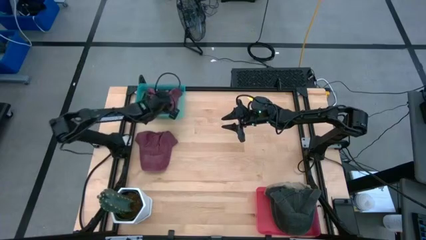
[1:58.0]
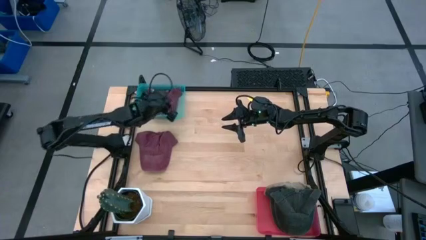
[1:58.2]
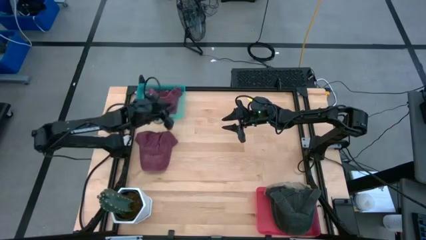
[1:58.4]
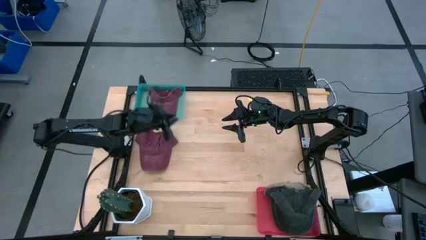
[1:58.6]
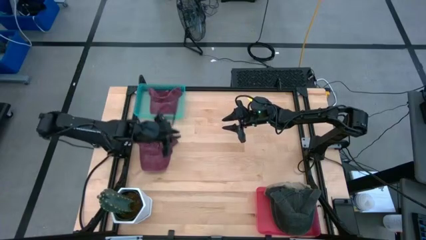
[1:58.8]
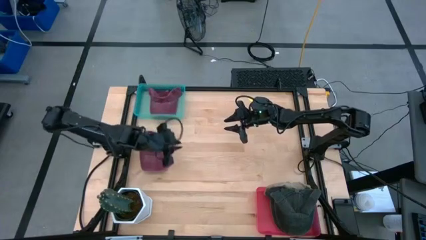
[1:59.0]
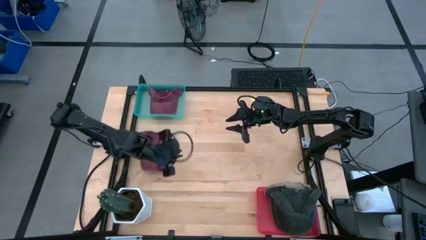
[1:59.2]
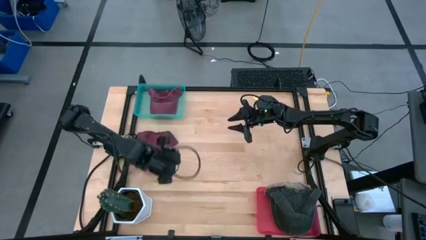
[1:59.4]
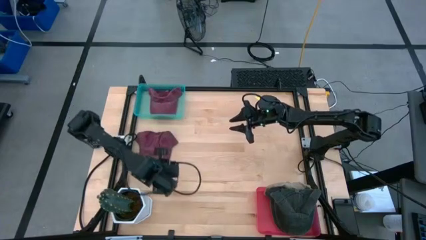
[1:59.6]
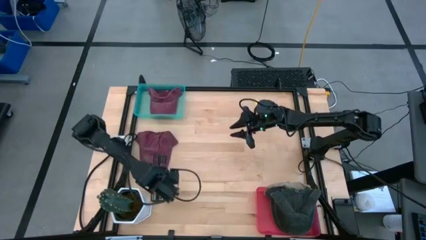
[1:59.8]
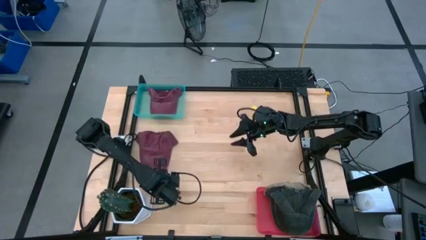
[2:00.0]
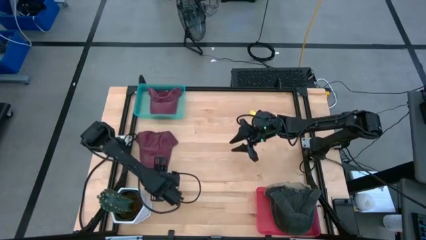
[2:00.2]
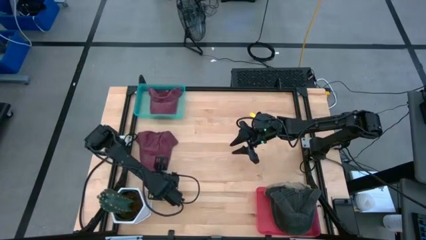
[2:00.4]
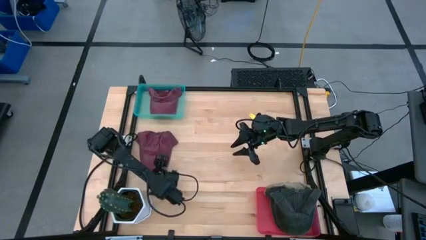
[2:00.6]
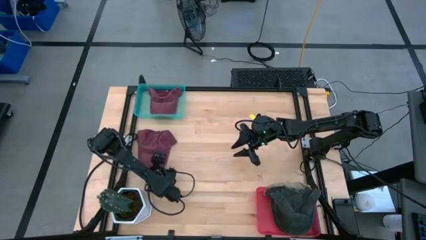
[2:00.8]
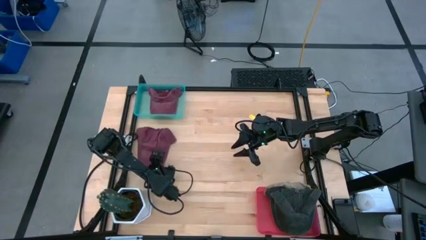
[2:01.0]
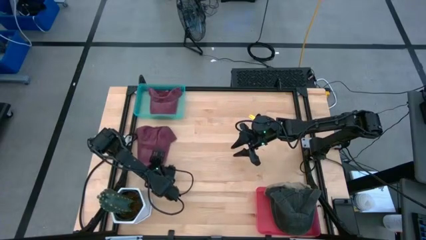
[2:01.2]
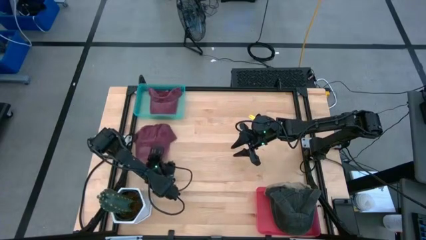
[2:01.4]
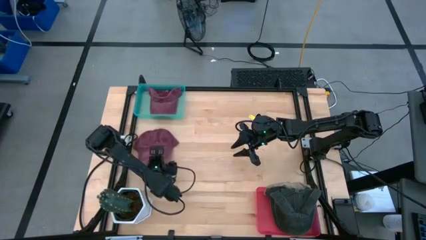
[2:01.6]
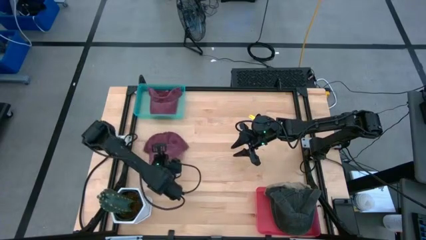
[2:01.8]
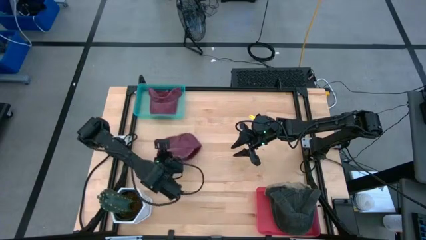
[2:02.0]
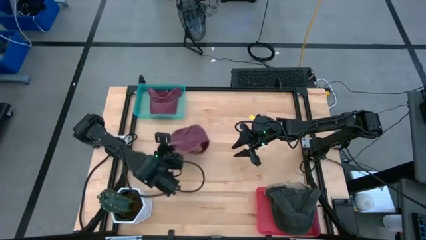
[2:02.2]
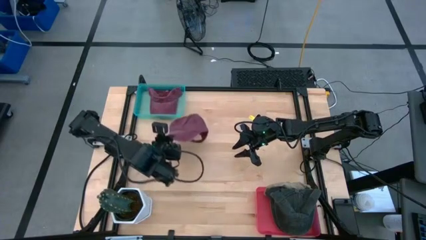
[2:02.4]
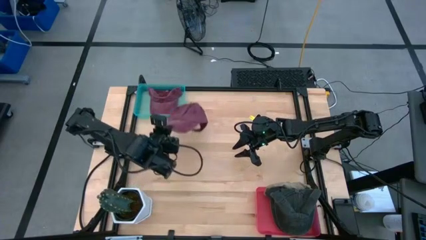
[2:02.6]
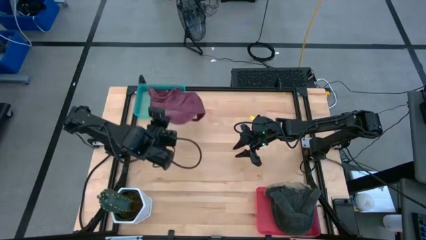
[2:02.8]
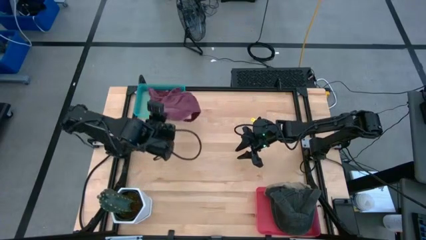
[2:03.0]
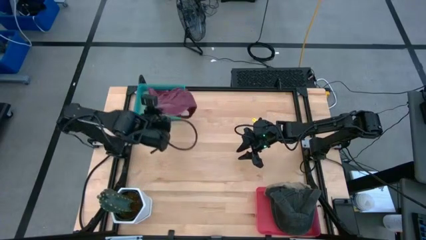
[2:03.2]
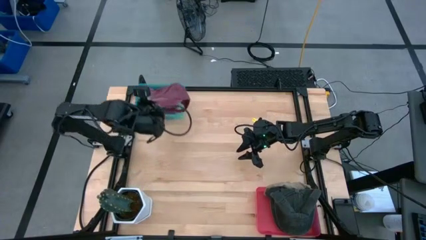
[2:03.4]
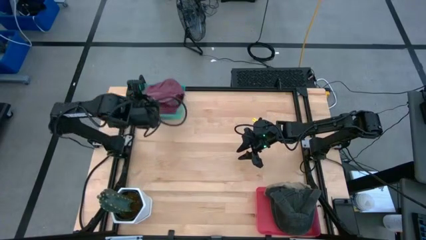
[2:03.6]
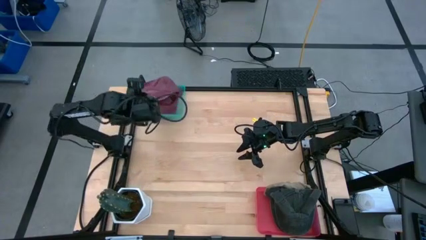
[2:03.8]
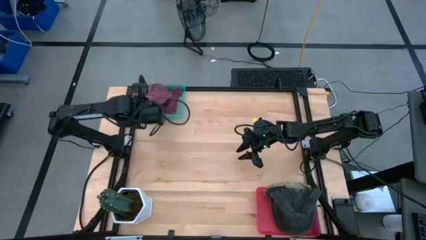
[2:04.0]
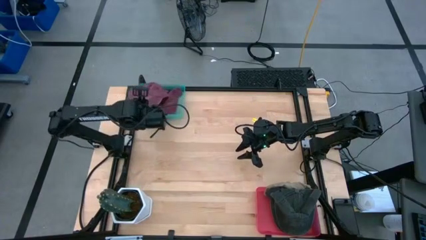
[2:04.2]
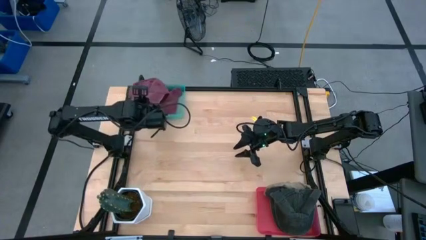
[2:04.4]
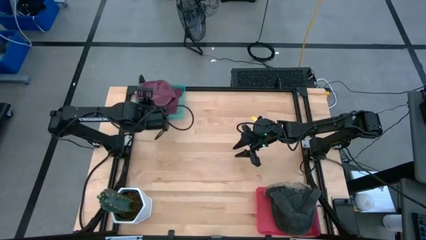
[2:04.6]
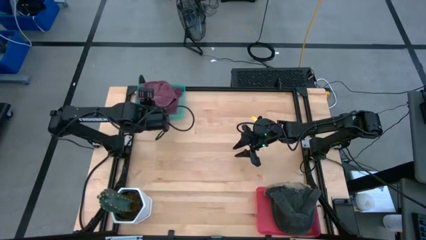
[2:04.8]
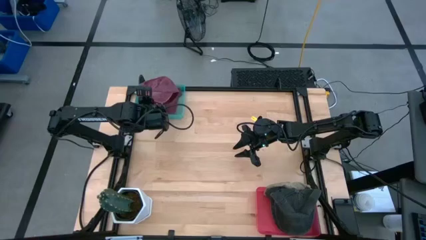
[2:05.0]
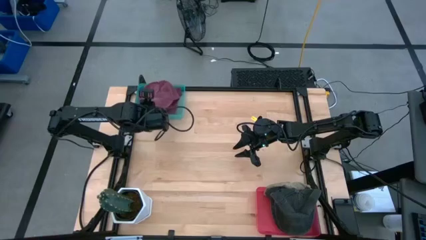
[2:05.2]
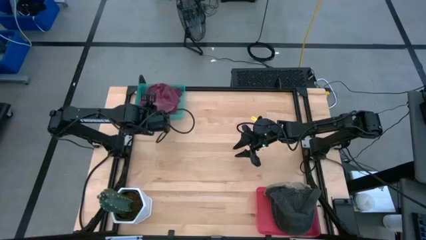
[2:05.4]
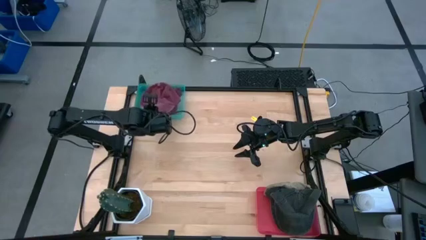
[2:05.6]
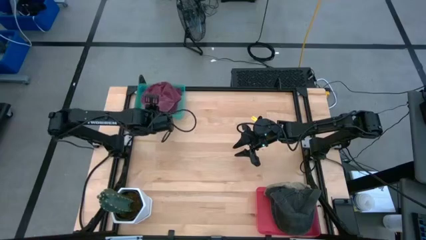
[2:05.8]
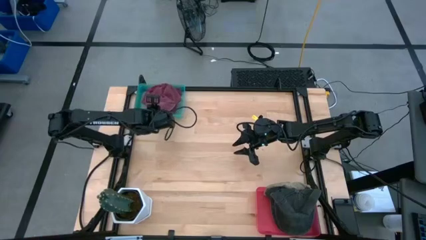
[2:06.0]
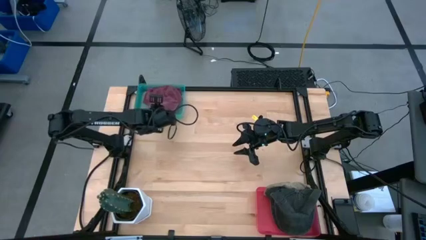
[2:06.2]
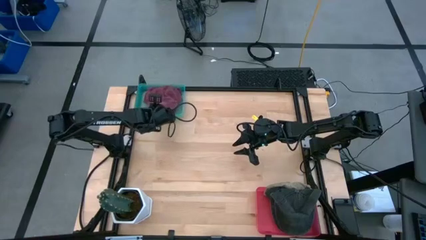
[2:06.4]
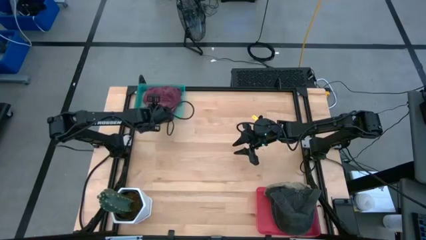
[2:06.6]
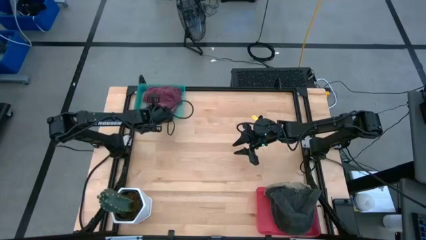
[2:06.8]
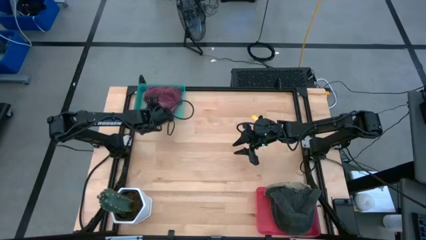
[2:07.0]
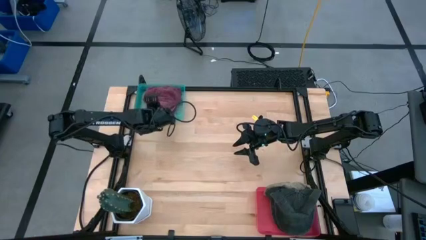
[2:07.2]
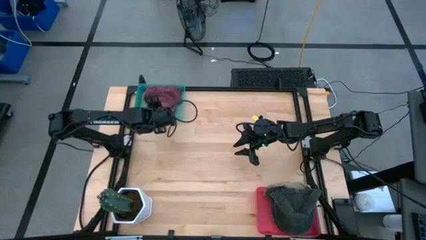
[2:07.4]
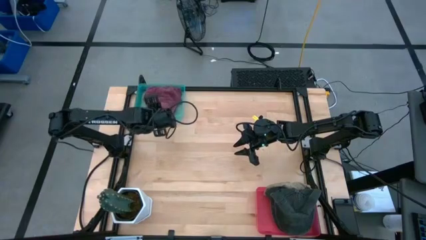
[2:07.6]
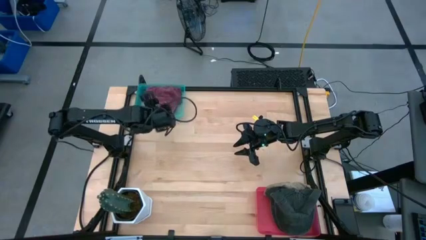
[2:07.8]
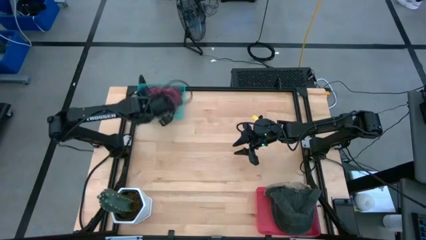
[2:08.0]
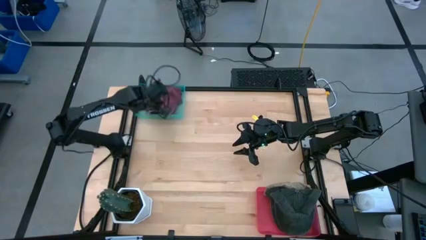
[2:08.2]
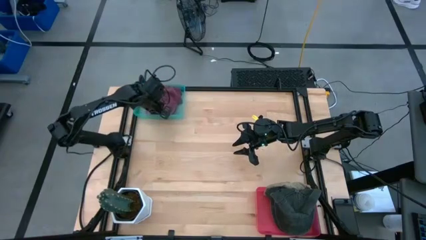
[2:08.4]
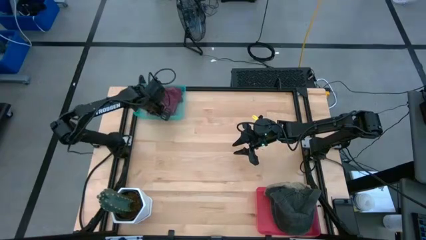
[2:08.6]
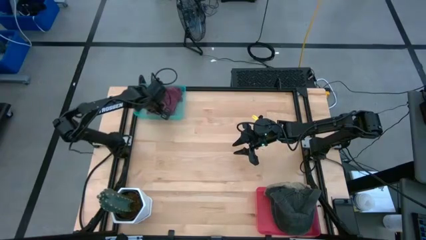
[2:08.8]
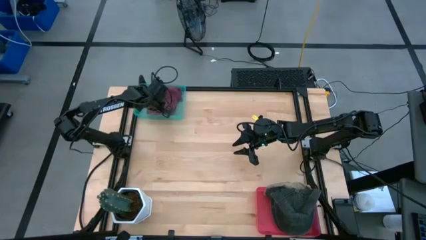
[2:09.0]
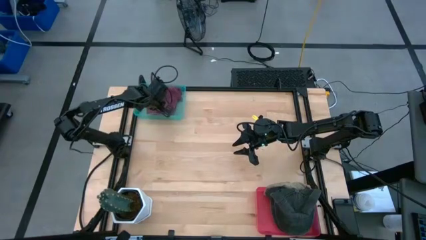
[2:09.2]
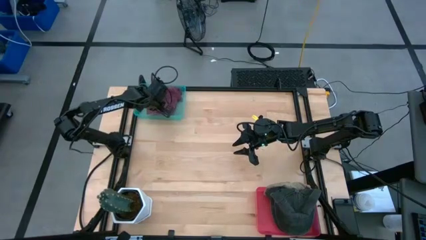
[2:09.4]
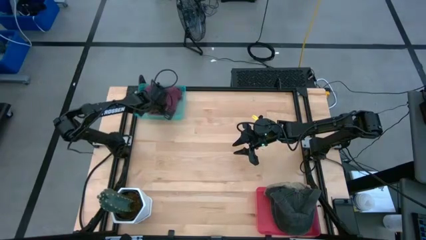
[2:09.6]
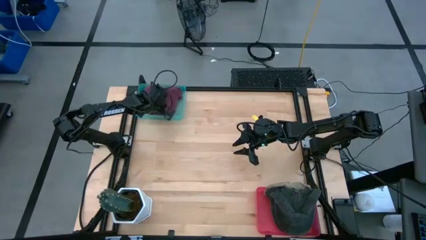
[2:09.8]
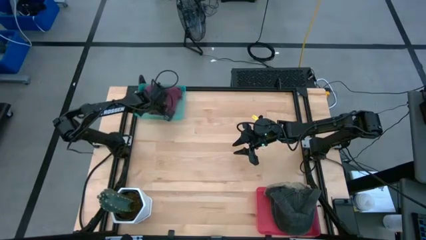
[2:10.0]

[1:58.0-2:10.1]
Task: Pick & Place hat
Put the red cap into the blue bin

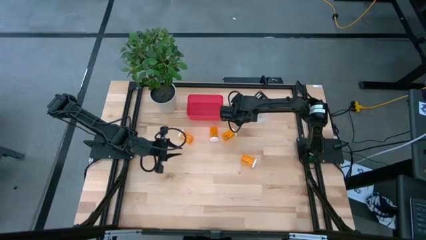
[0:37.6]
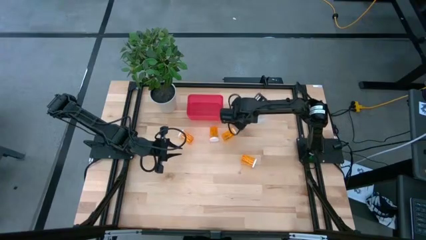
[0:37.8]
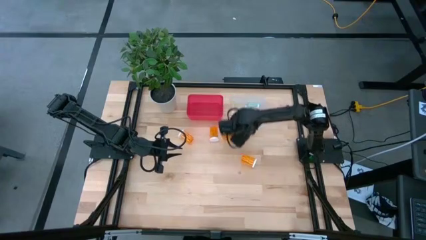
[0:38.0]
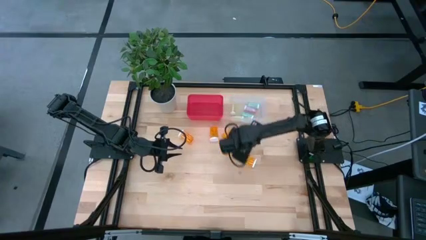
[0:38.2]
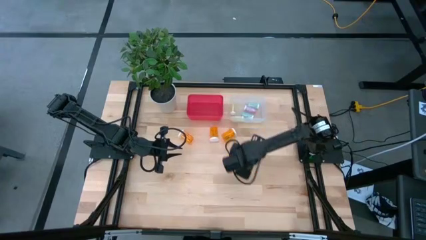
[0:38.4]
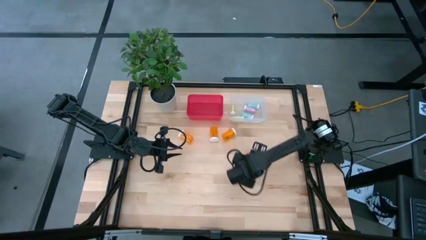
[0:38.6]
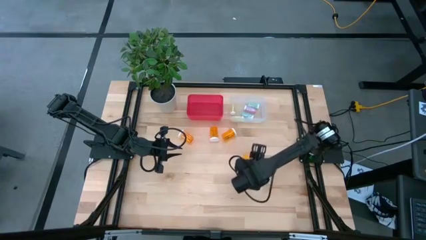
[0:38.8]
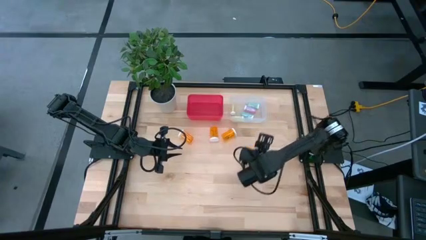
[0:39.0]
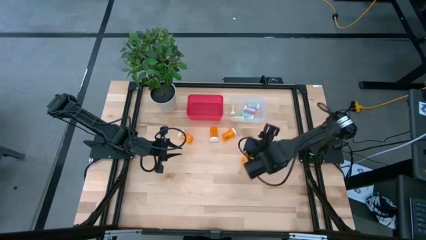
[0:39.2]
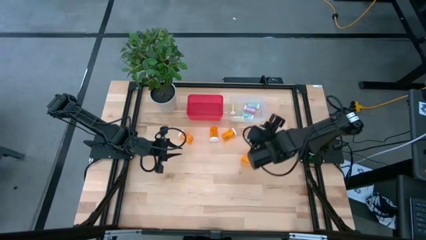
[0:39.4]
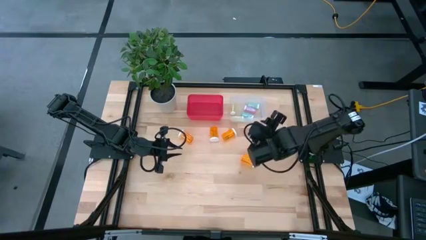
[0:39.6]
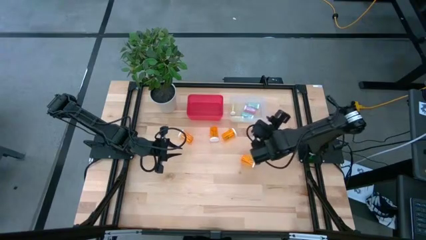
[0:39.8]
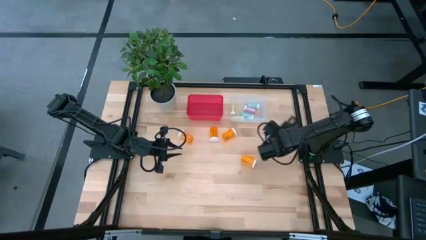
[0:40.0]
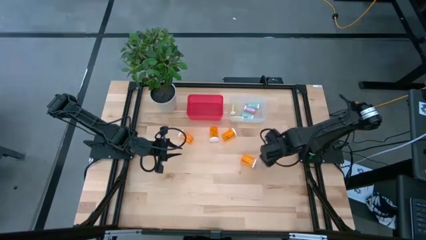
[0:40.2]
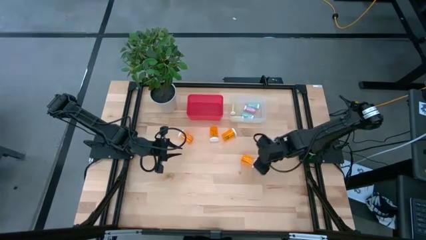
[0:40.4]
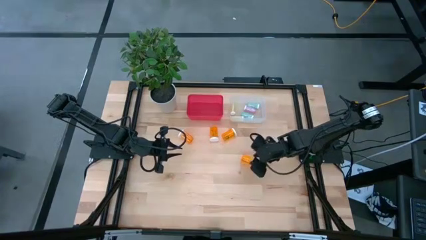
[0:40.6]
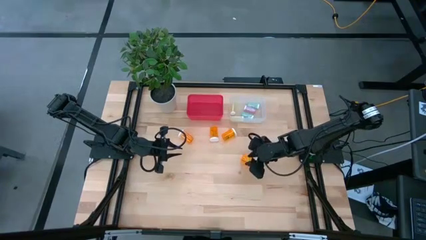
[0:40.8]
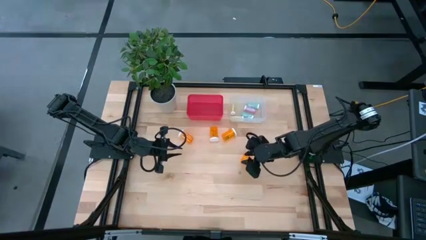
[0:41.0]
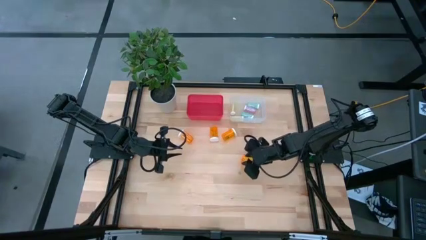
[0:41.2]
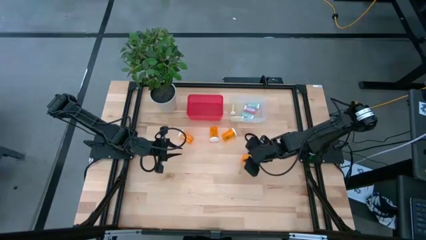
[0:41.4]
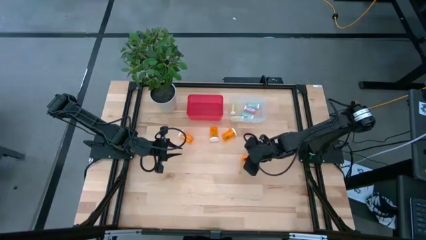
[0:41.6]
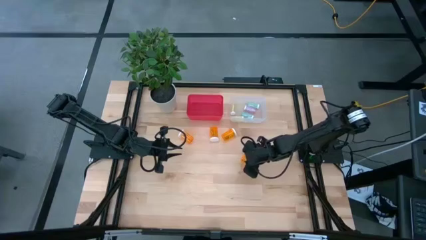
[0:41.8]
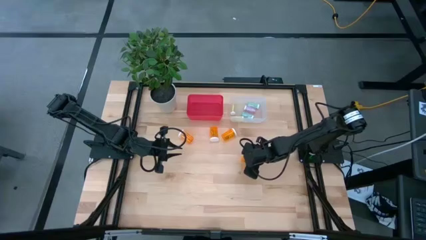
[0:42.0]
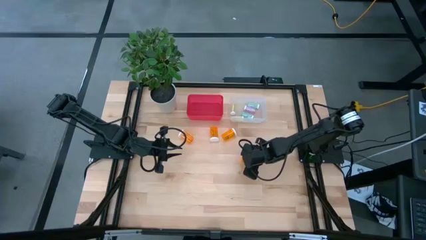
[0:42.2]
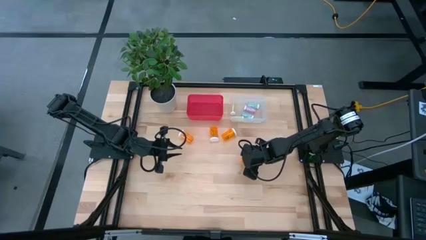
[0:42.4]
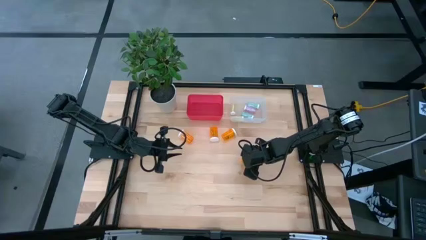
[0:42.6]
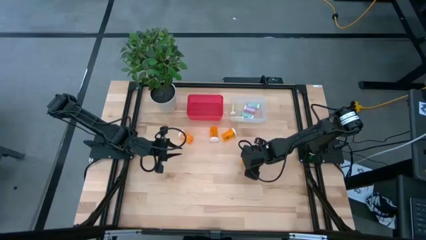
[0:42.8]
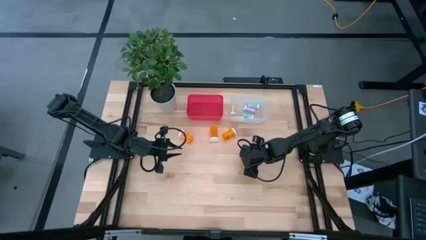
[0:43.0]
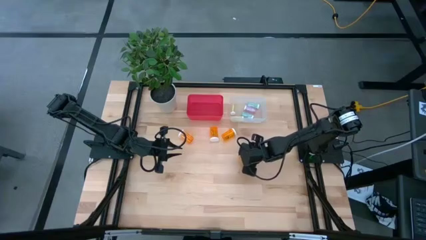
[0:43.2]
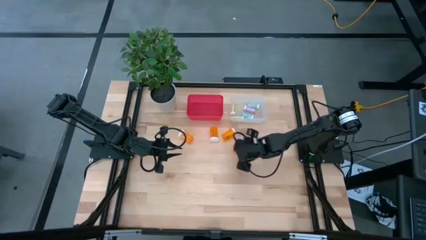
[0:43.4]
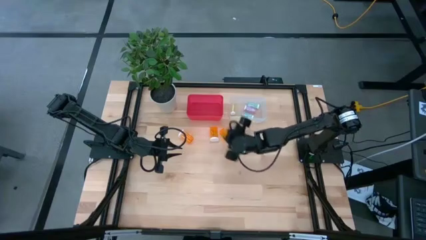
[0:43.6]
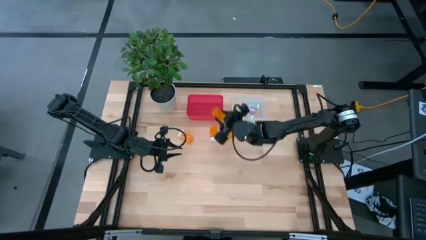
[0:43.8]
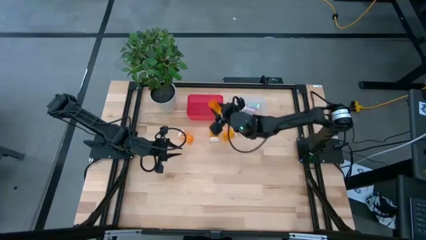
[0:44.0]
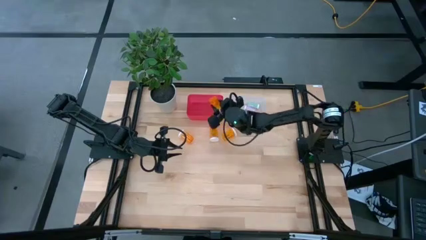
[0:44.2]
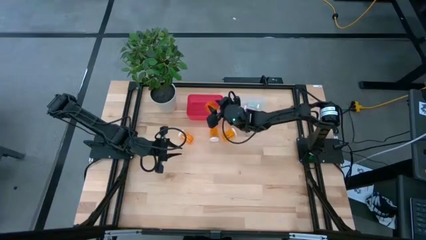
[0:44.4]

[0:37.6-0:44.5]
Task: Pick and place medicine bottles into bin by pill shape (circle, oval)
Put the orange capsule bottle into the red bin
